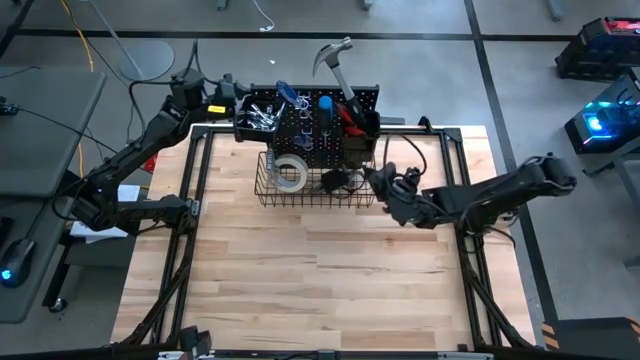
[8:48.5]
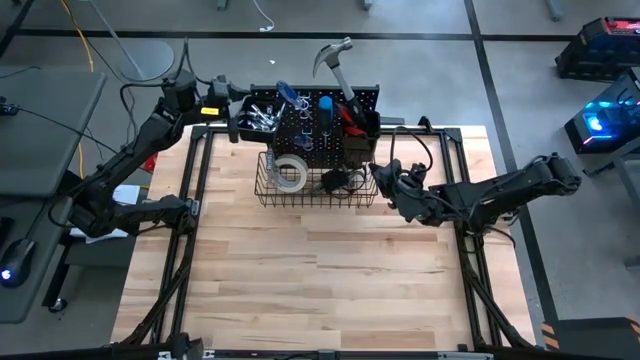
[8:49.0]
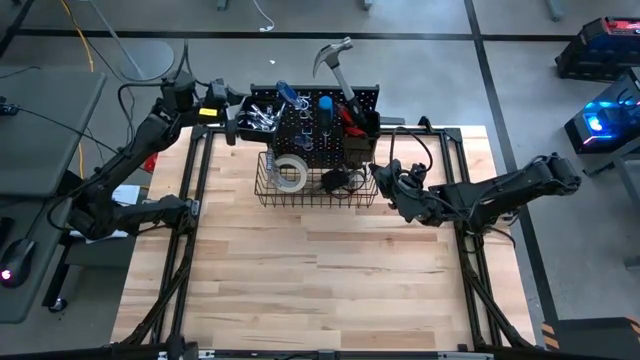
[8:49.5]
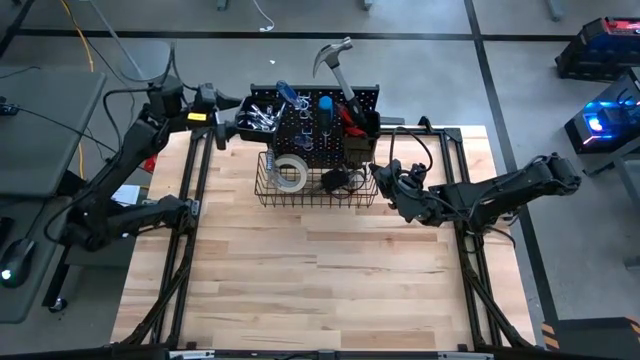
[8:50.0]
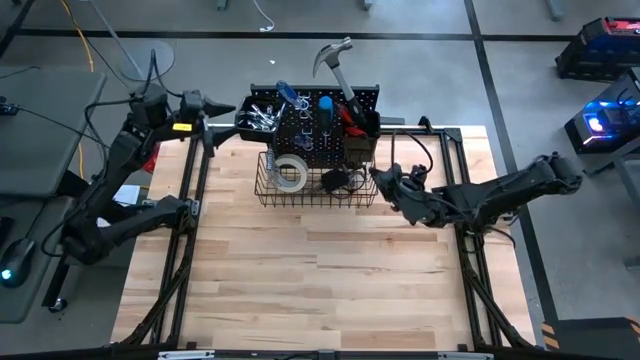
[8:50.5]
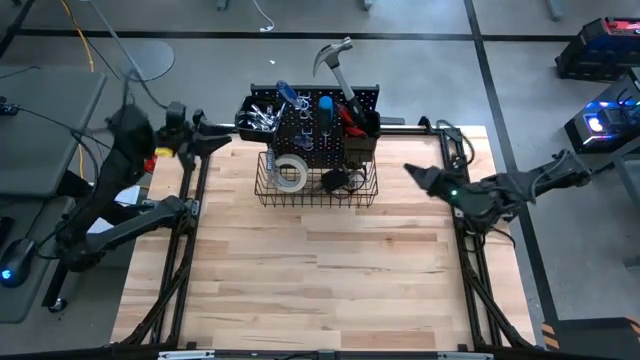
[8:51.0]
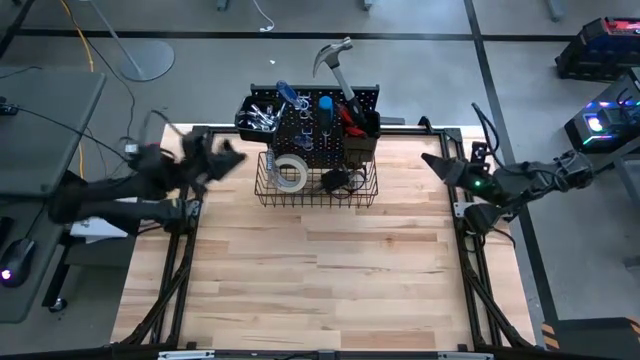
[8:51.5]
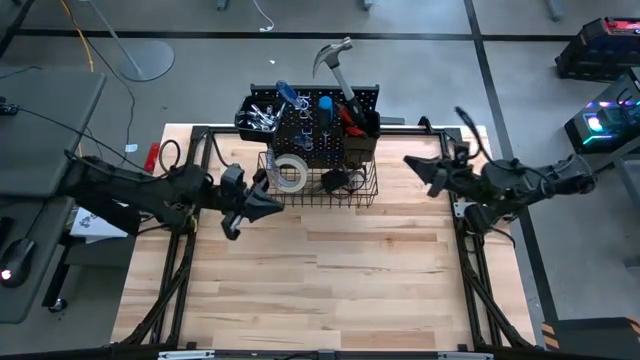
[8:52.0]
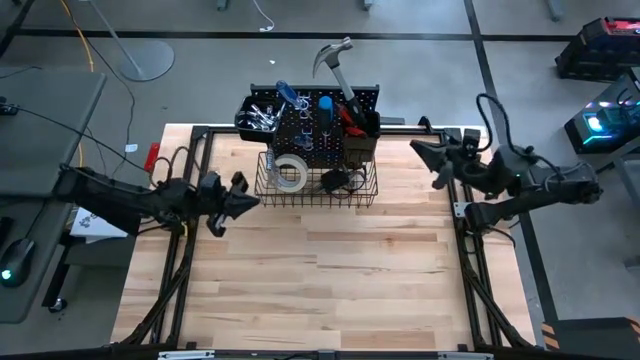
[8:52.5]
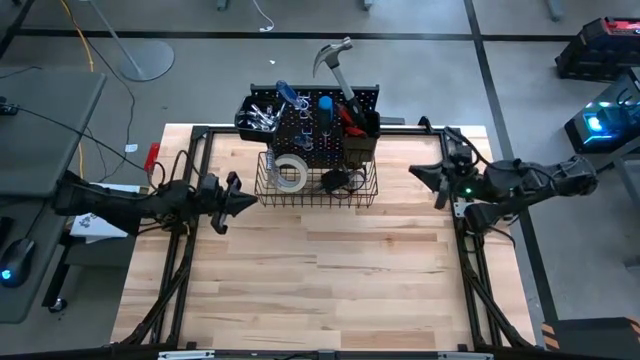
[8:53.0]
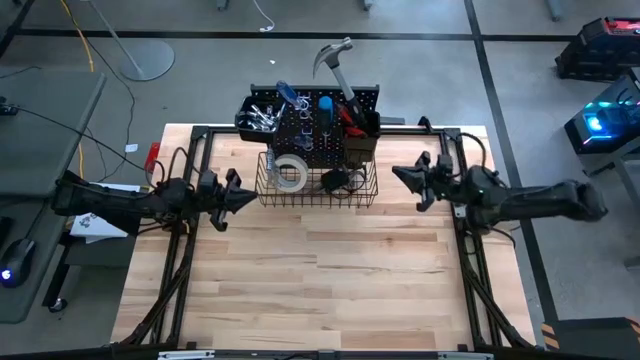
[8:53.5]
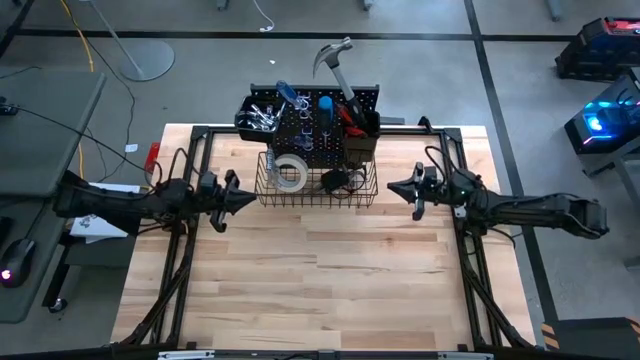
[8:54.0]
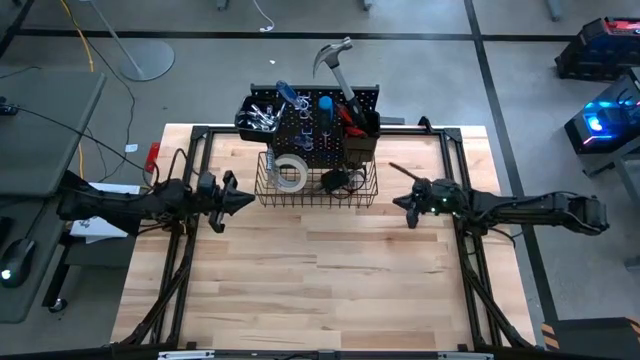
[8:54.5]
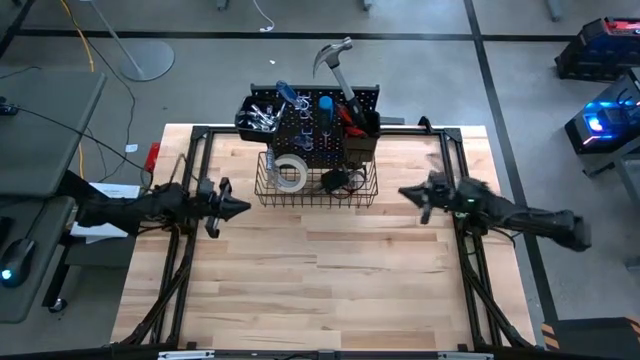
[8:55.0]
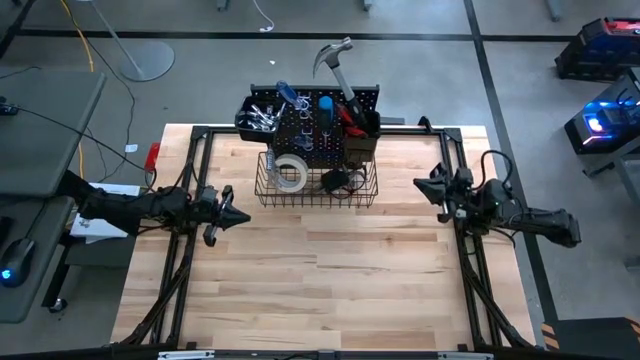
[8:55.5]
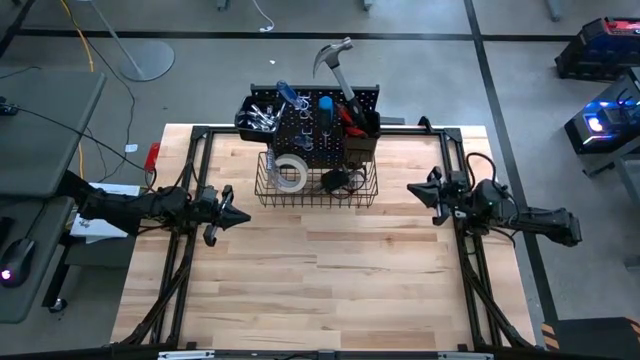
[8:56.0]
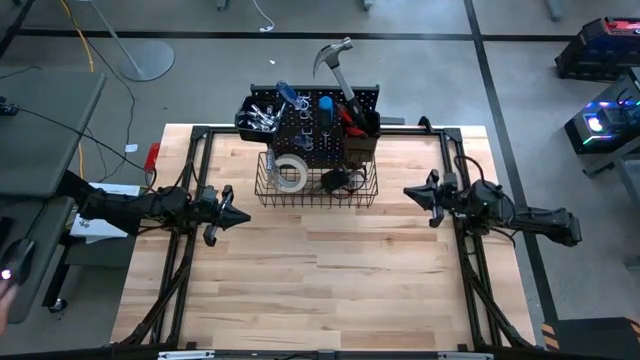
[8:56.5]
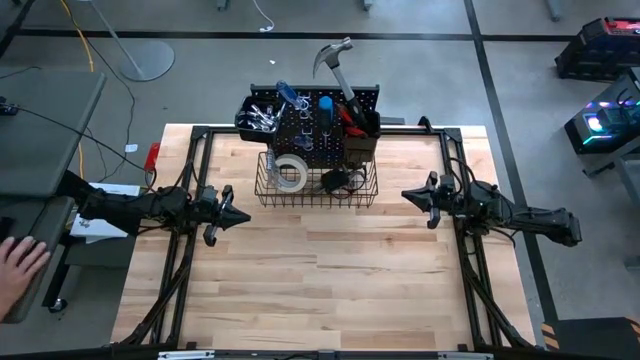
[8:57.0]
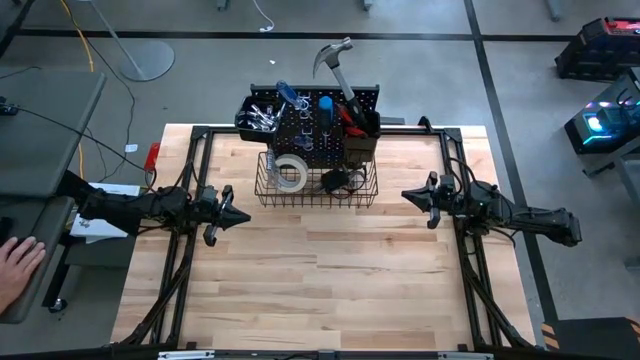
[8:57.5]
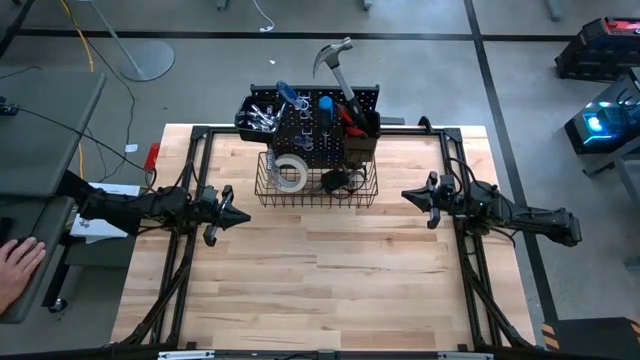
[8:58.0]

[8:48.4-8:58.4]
Task: Hang tools onto peg board
Return to Home Position

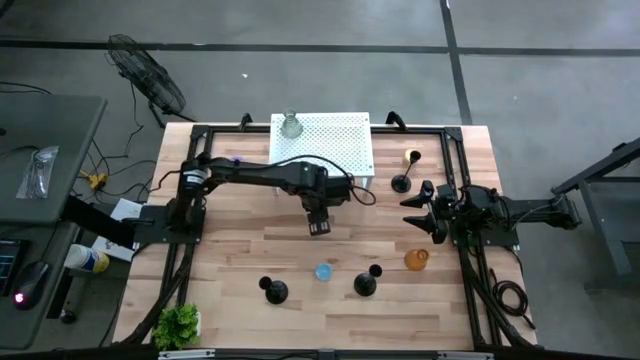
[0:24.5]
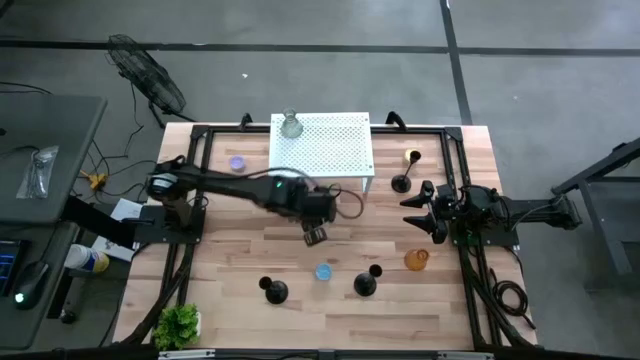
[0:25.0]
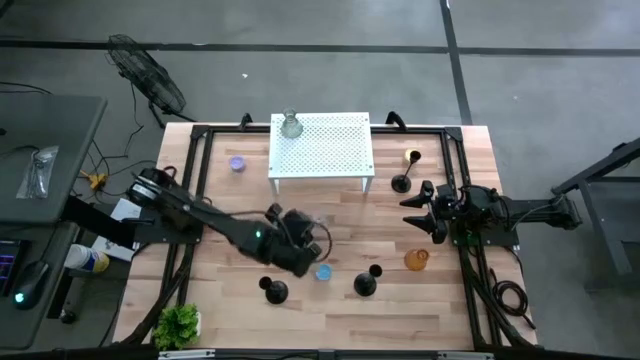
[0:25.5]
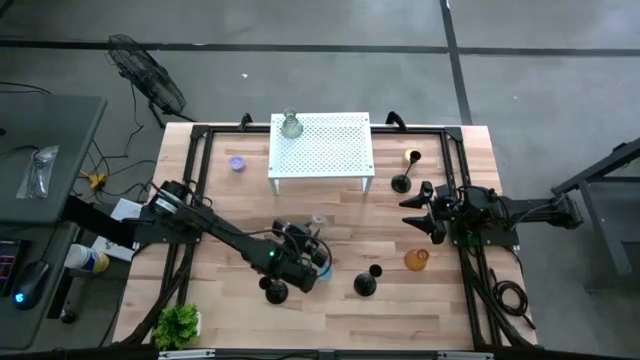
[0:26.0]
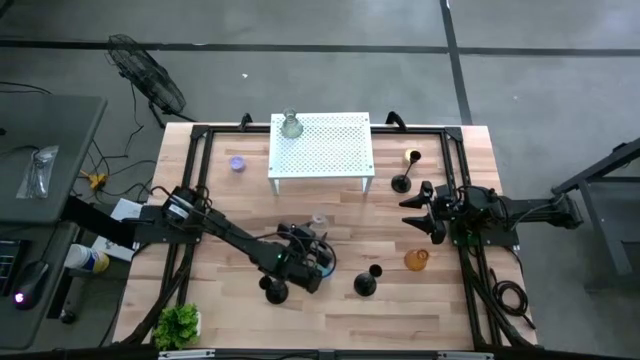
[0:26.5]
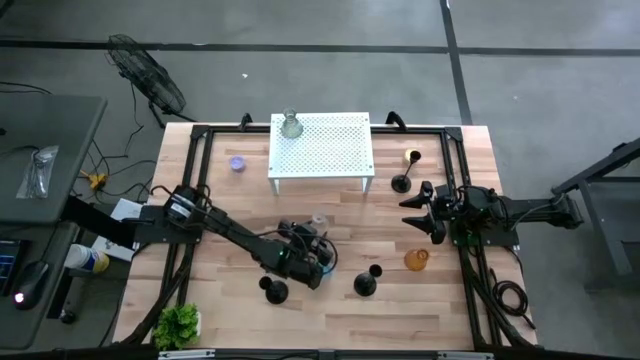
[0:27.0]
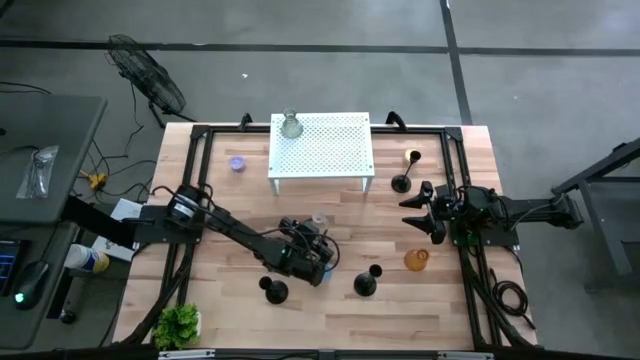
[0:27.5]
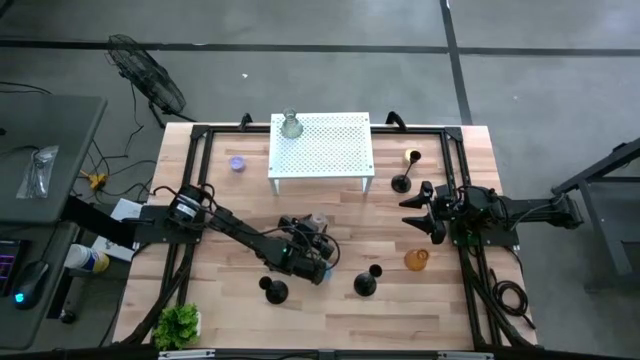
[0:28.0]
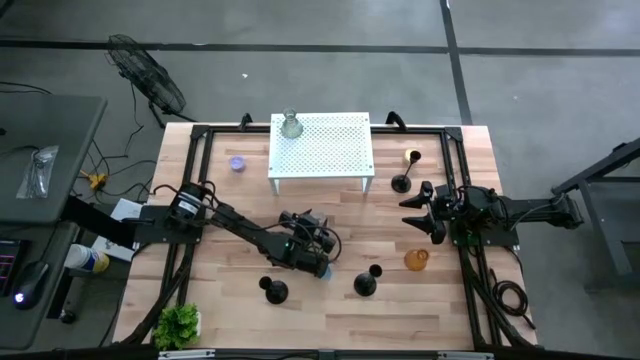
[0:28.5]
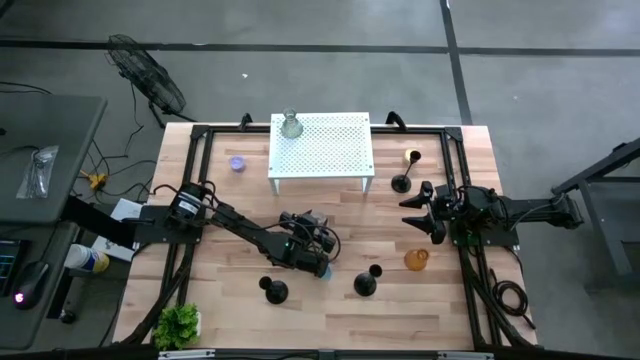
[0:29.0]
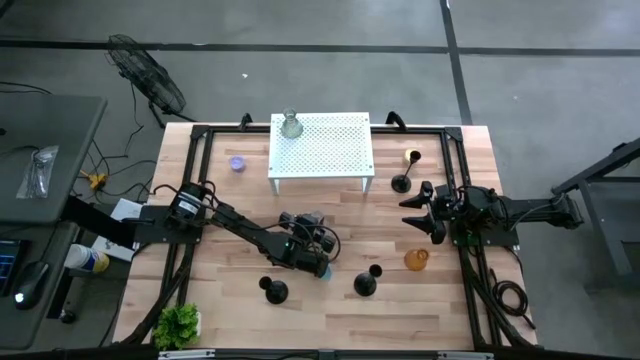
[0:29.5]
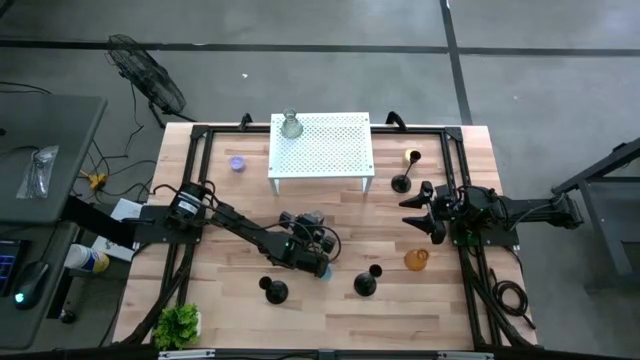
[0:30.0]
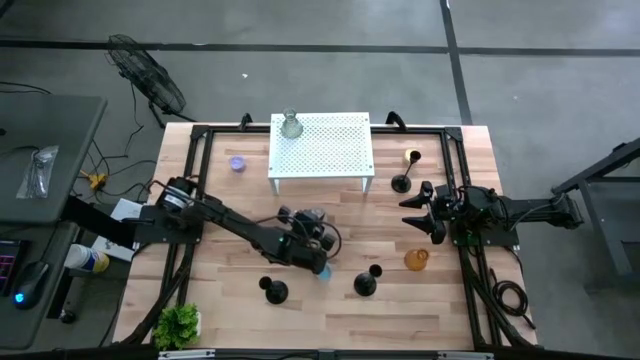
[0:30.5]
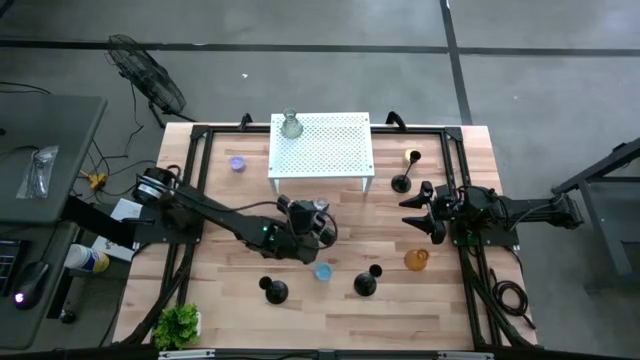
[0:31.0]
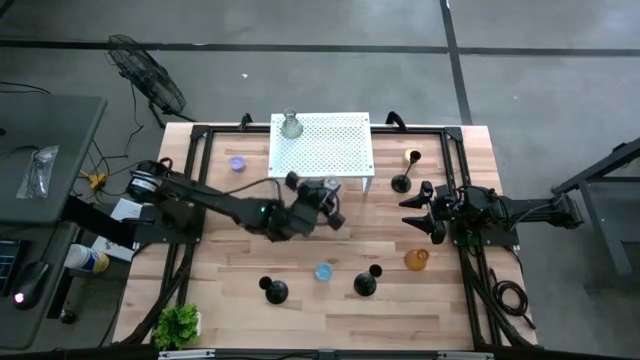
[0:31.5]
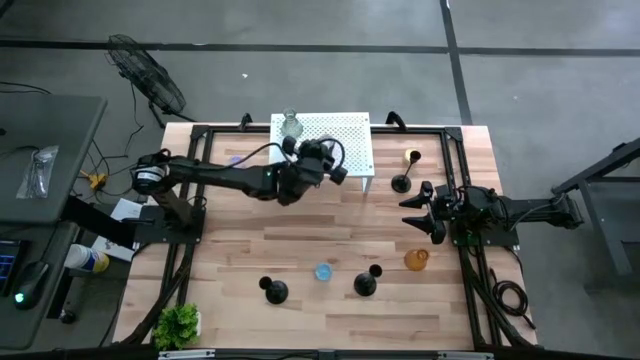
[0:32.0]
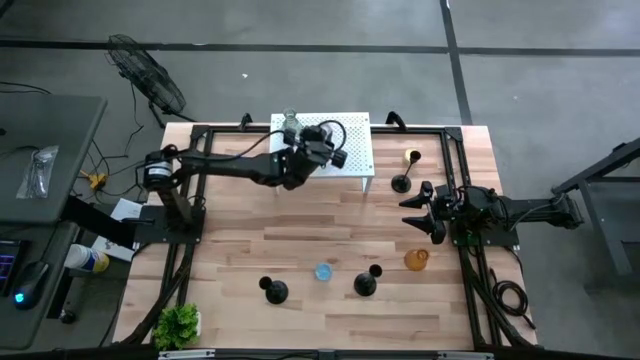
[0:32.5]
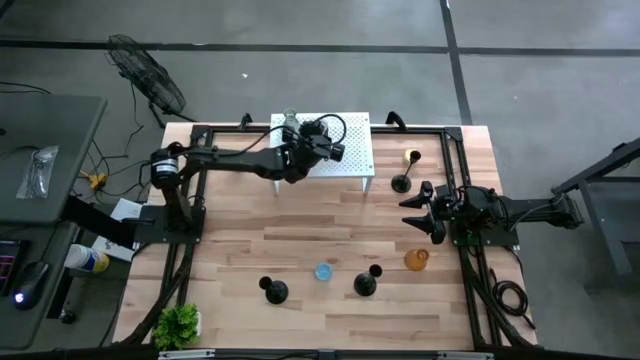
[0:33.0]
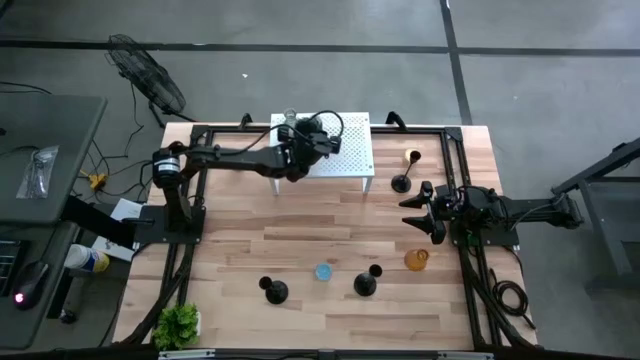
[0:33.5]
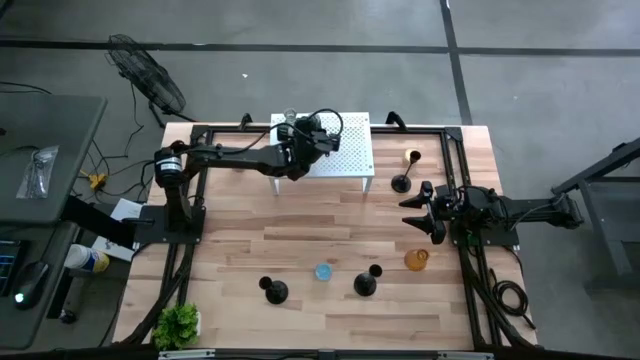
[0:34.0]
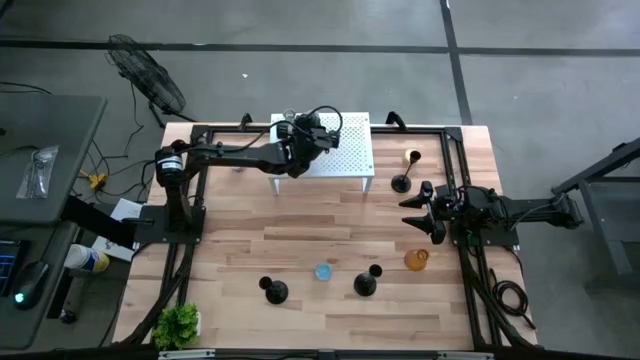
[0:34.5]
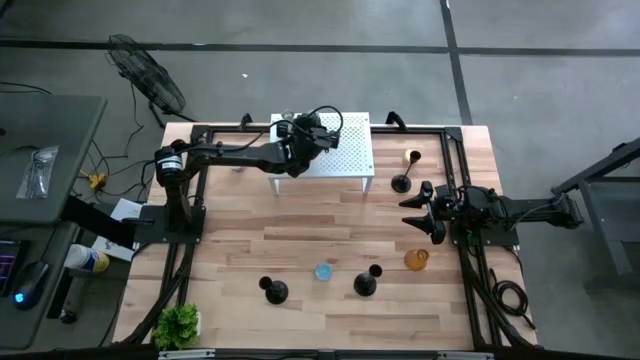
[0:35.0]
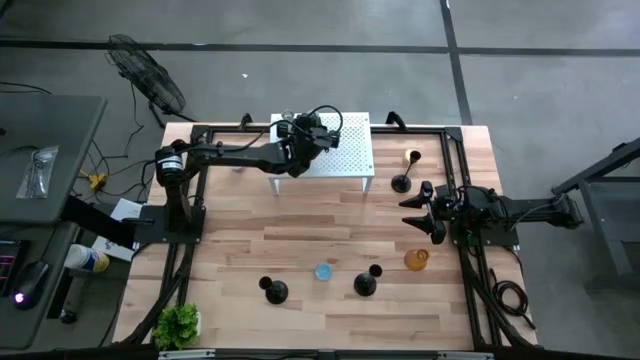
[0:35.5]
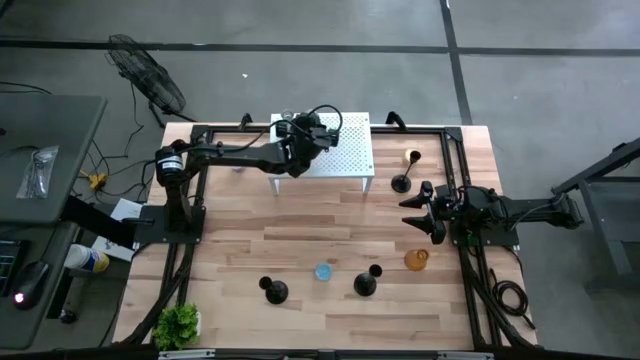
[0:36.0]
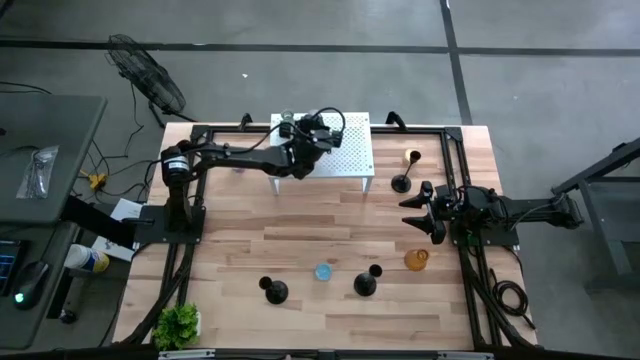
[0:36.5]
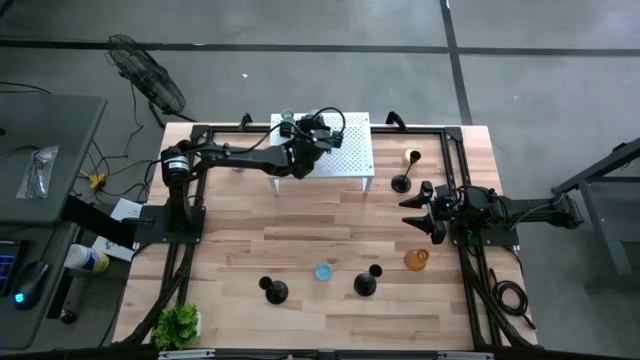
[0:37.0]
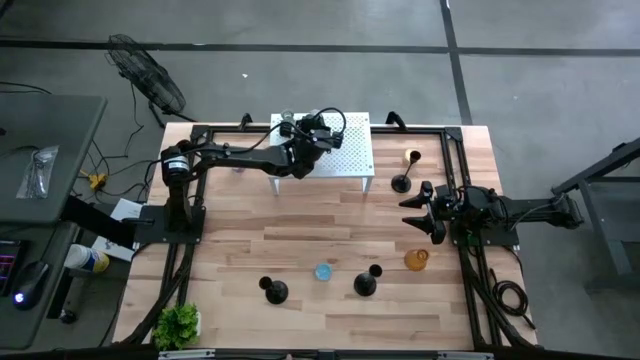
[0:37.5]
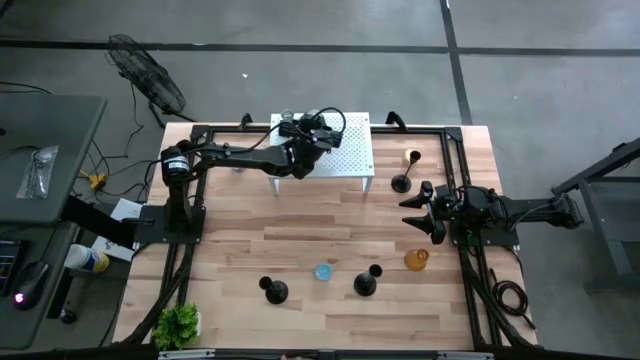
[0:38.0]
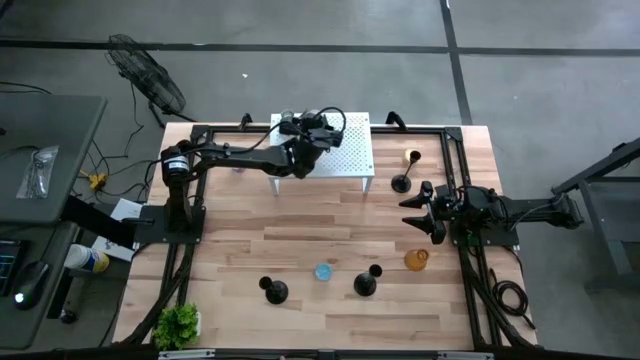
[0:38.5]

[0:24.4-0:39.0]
Task: Pick & Place candle stick holders
Put the transparent glass candle holder on the shelf aligned with the other glass candle holder
